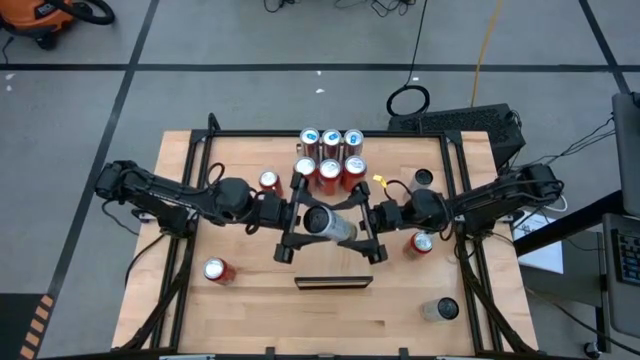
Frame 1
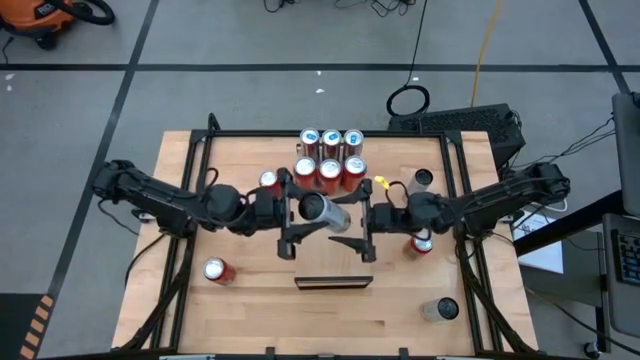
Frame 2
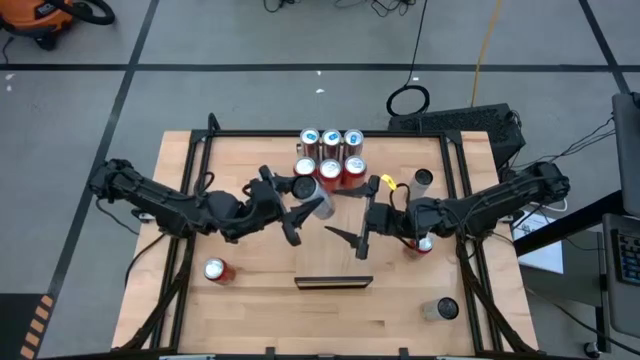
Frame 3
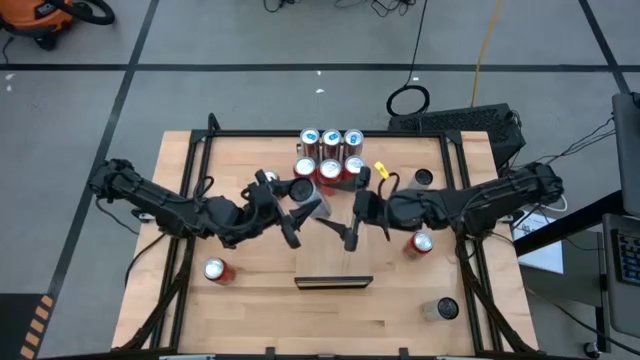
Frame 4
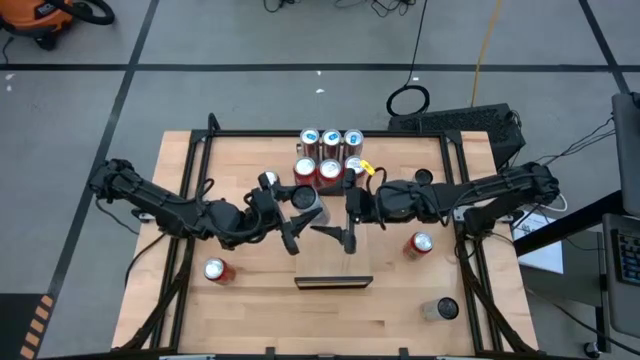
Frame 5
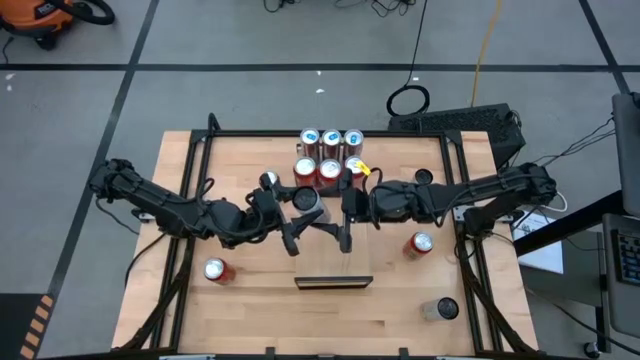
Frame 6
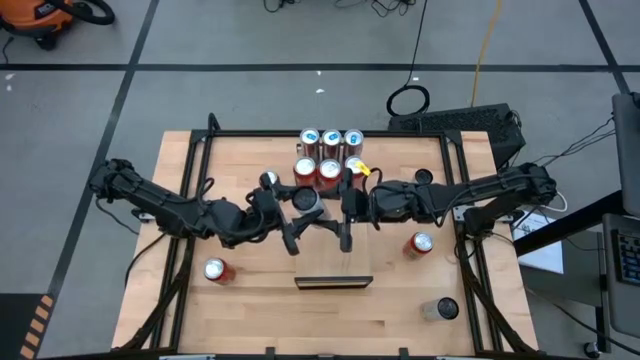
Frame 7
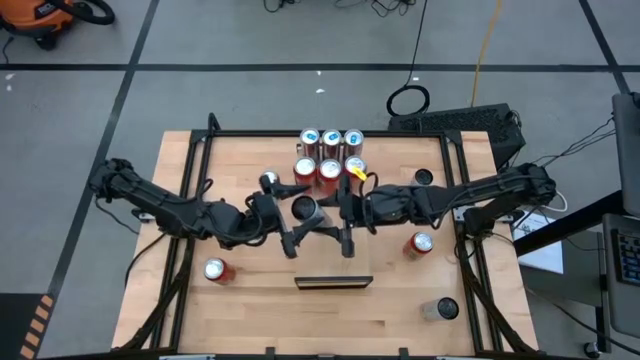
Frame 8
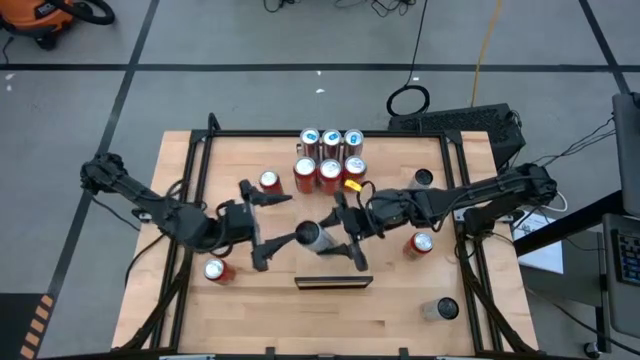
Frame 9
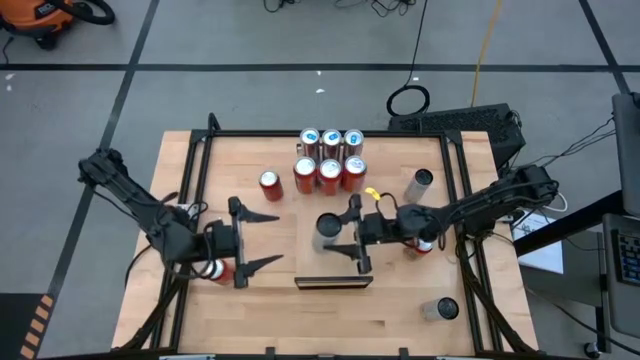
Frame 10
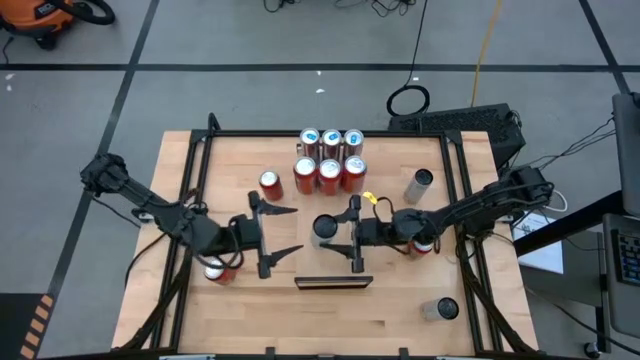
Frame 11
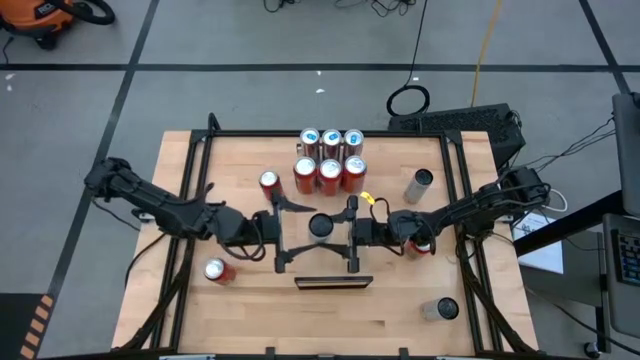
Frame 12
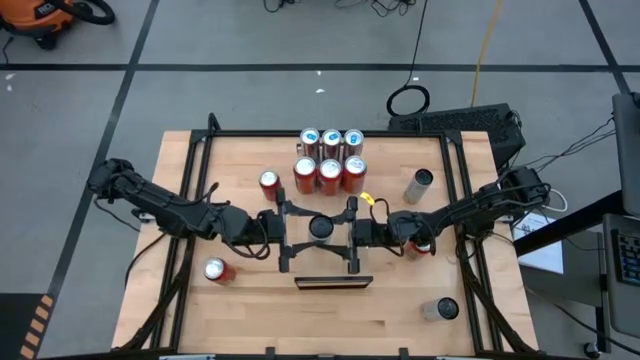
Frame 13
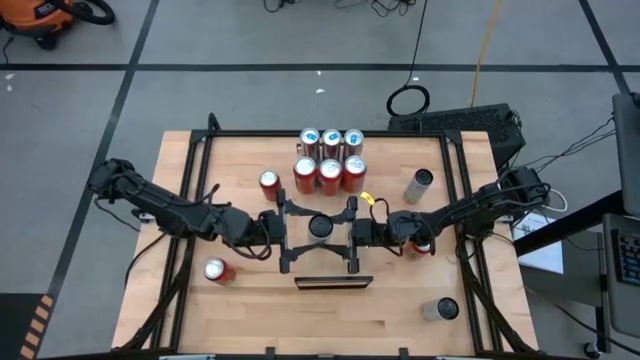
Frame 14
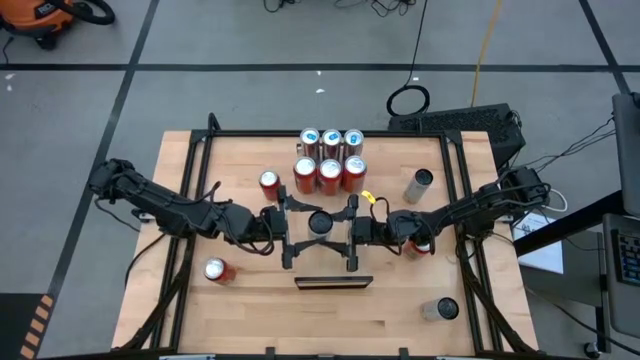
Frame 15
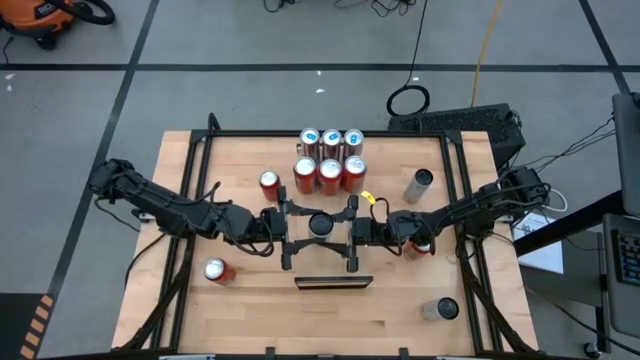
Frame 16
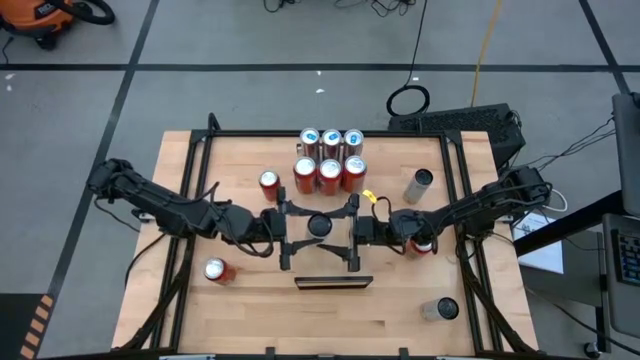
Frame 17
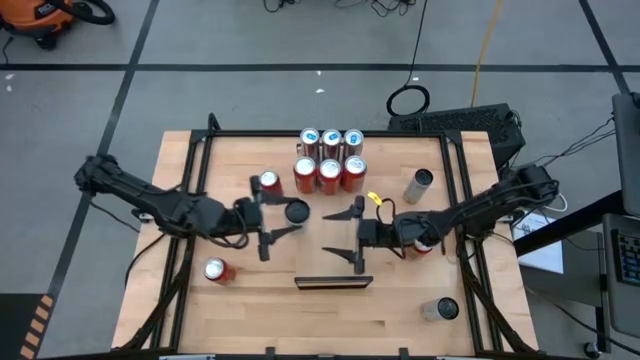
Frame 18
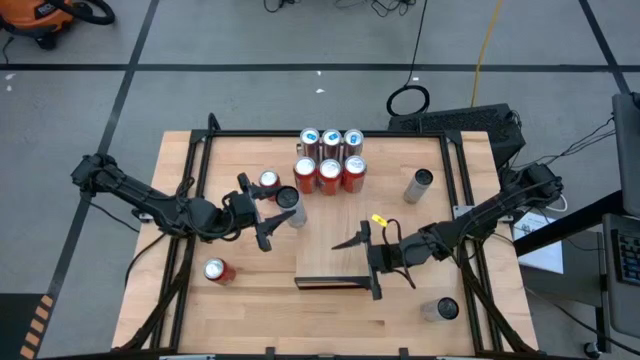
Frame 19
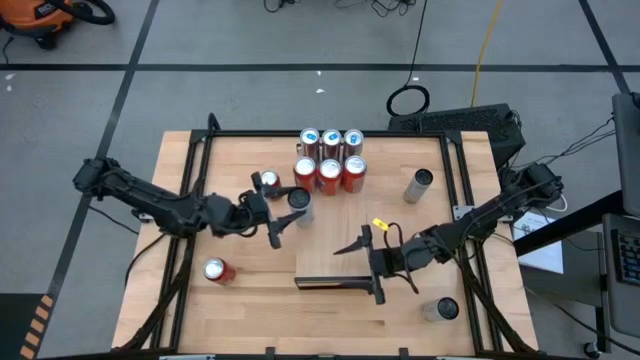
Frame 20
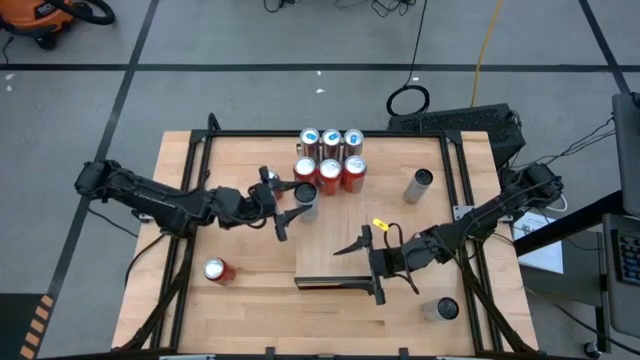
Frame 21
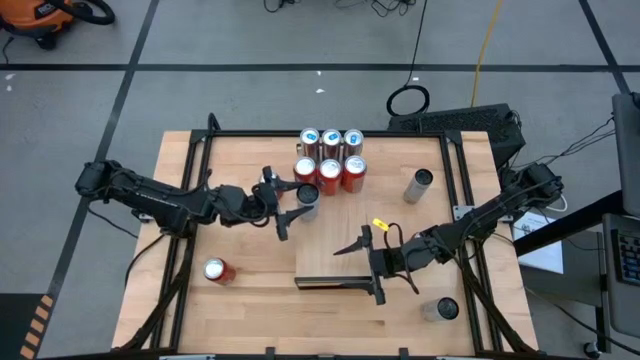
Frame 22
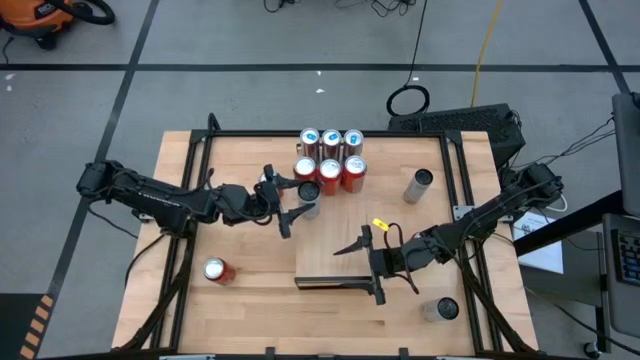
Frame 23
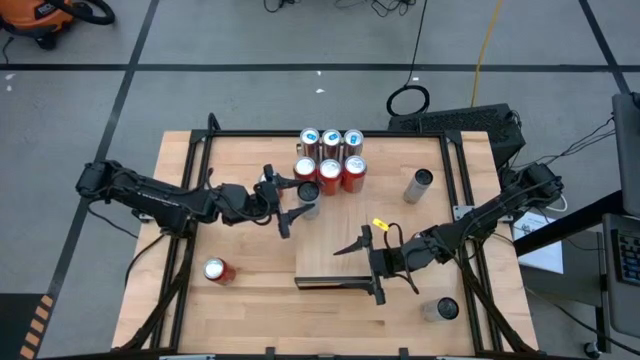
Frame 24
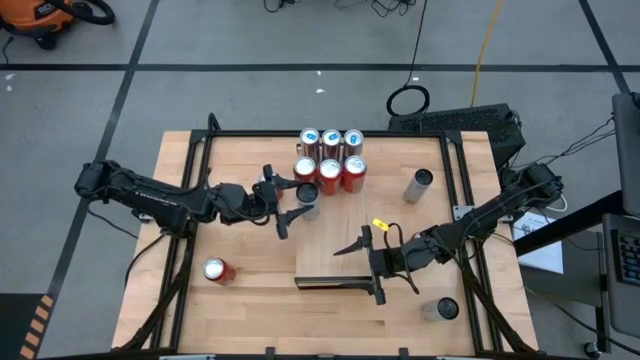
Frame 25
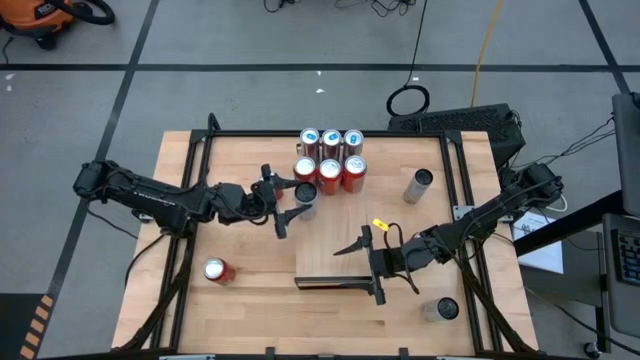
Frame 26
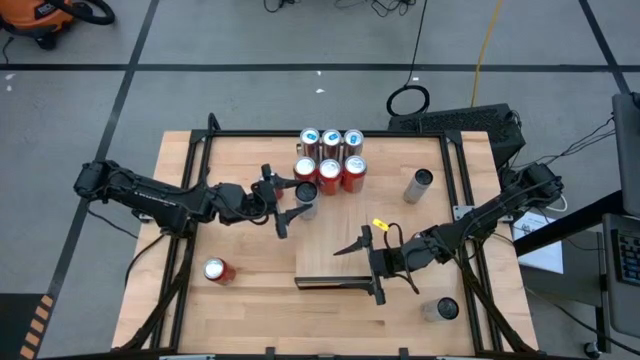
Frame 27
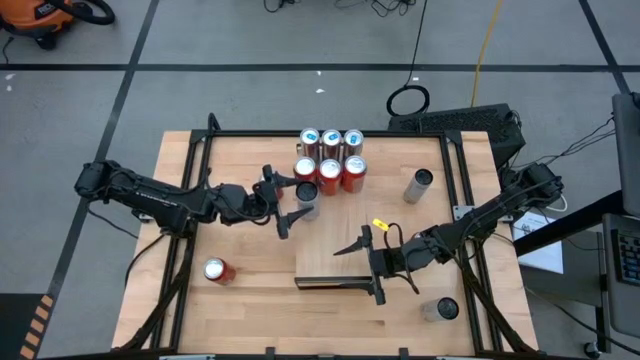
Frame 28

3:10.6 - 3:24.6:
Task: Place canned beverage on shelf
Put the top left white yellow soda can on the shelf

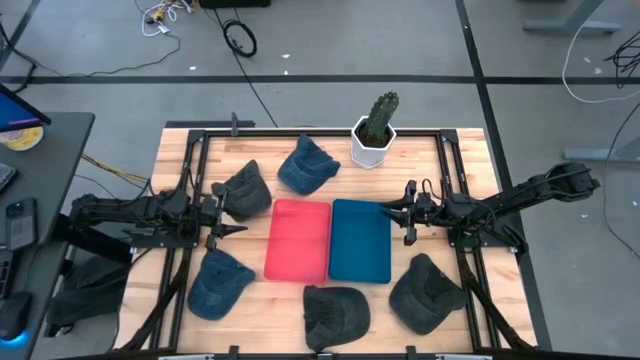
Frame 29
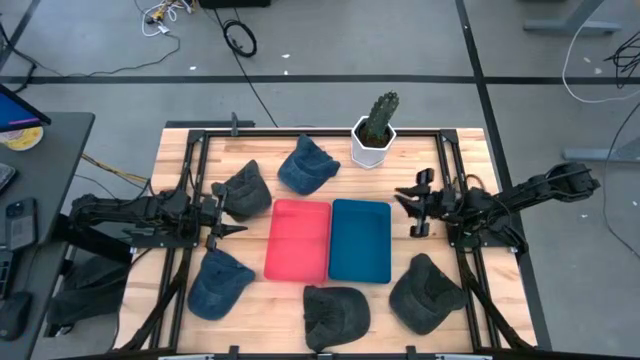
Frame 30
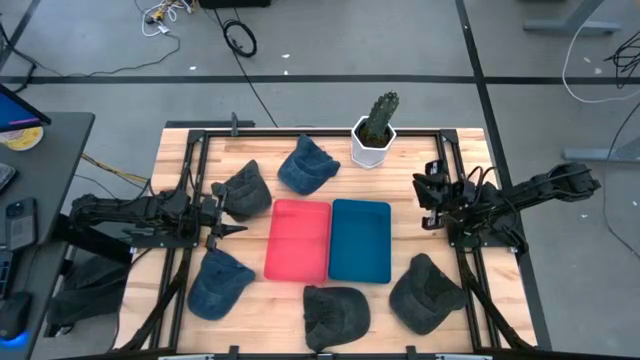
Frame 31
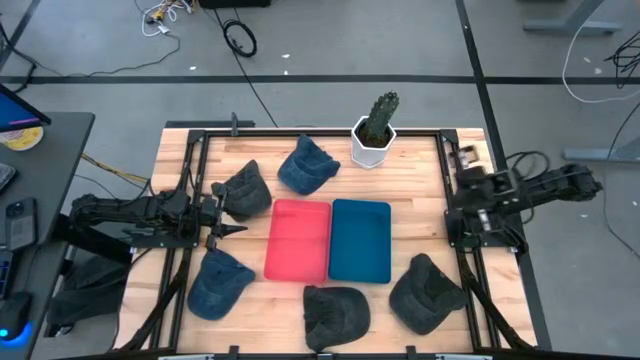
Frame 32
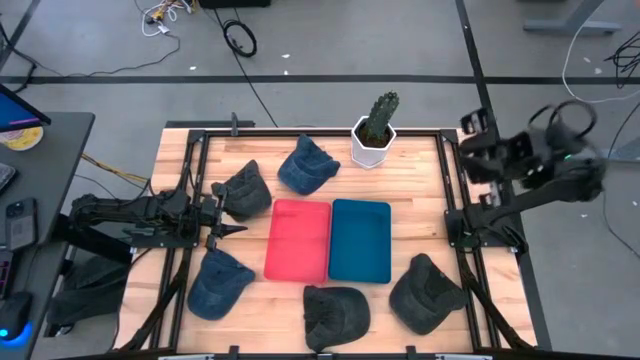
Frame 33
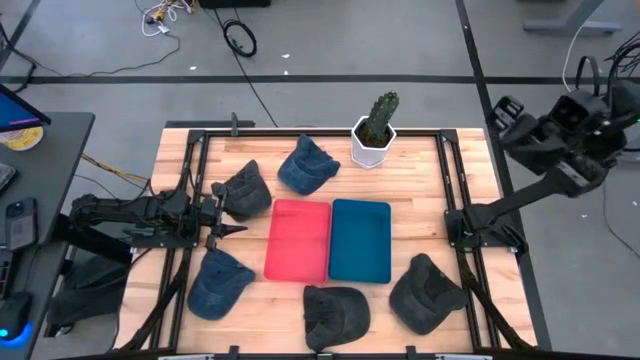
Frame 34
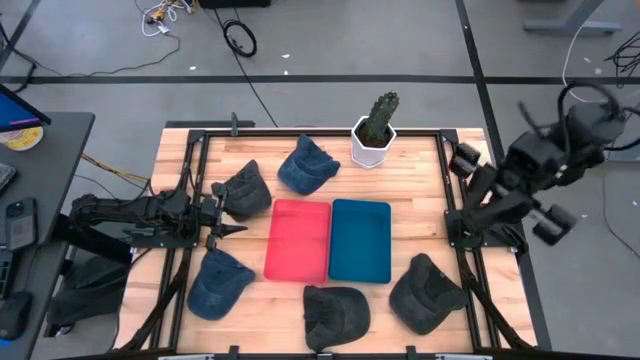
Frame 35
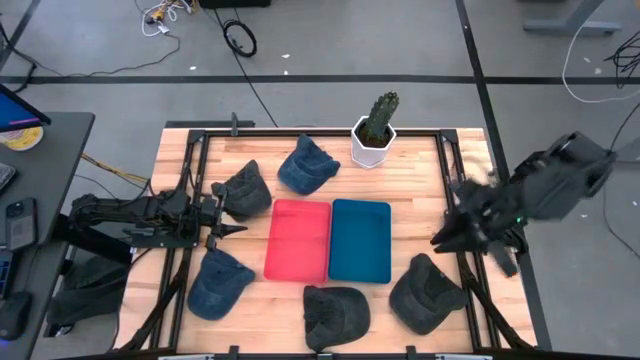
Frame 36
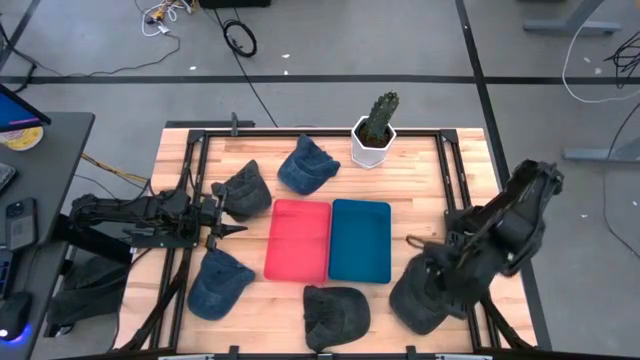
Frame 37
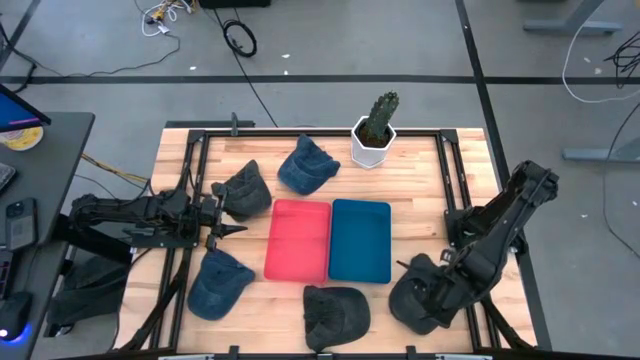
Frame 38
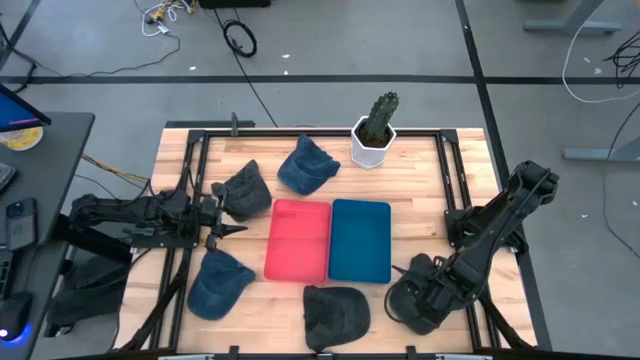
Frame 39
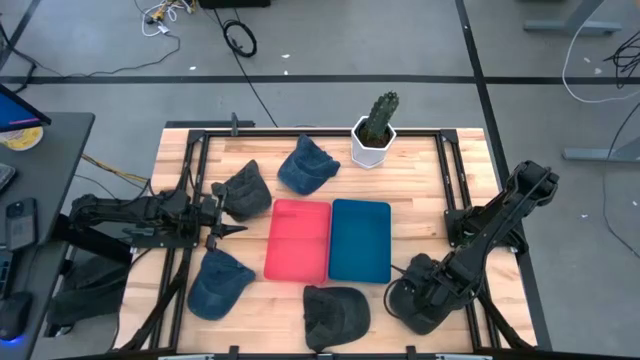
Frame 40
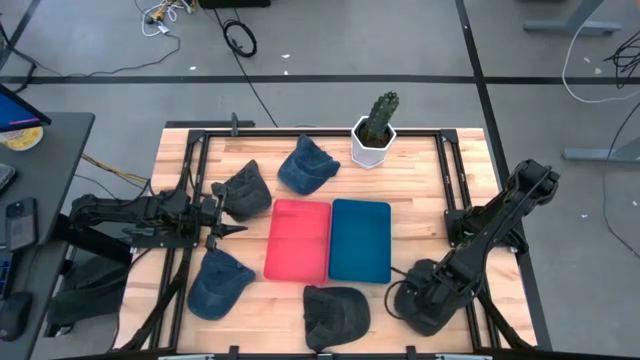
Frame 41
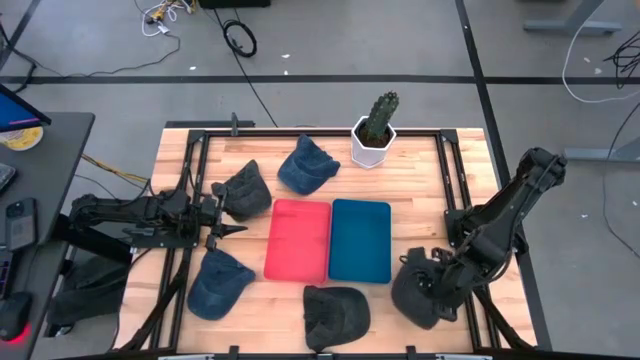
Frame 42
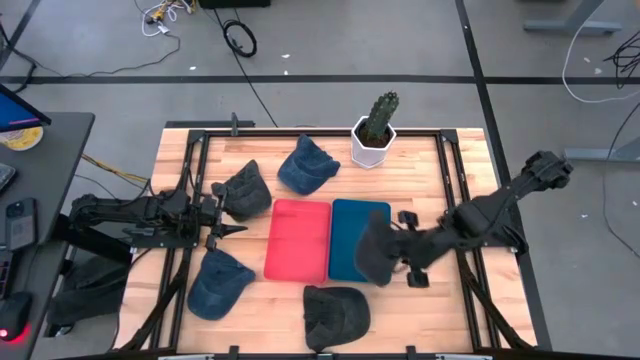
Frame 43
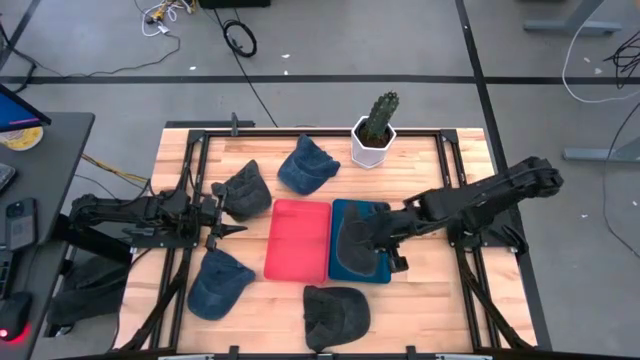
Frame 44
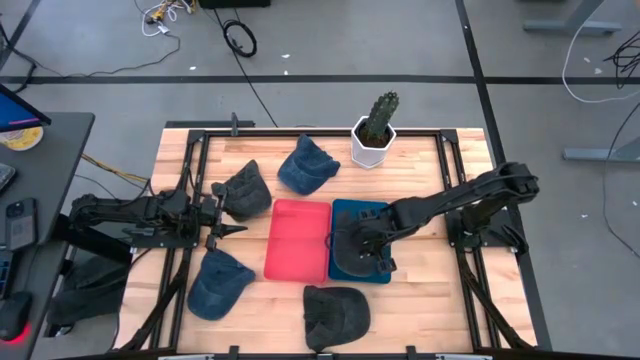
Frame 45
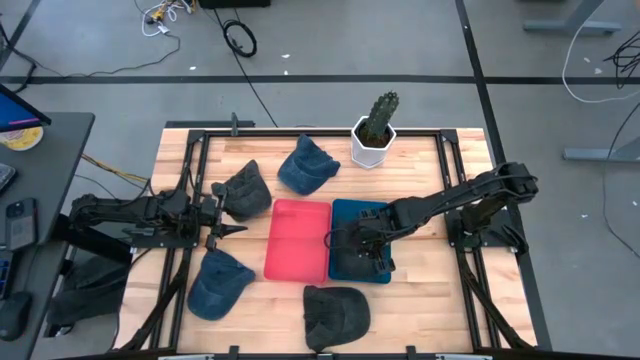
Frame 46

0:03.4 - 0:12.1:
Task: Pick & Place hat
Put the bottom right black cap into the blue bin
